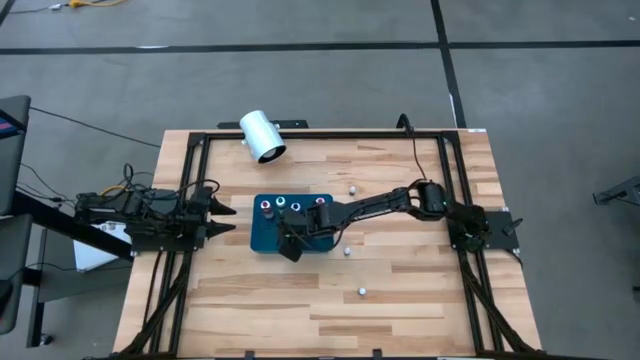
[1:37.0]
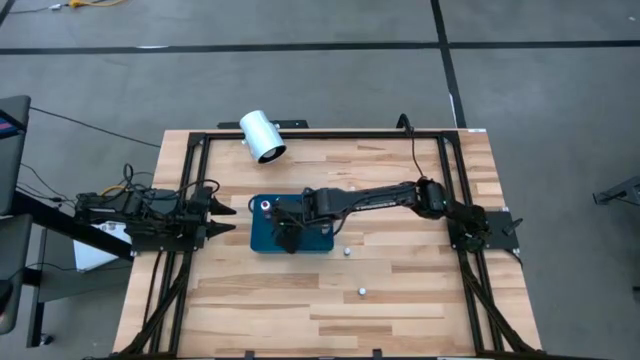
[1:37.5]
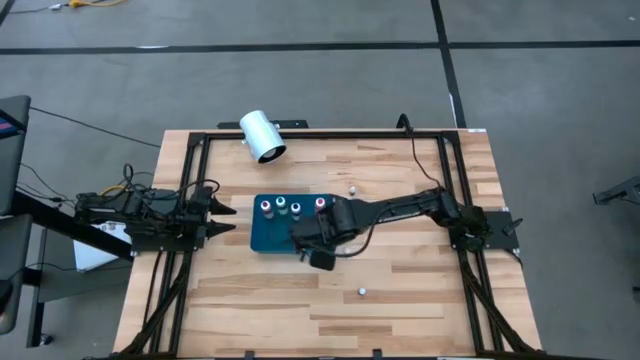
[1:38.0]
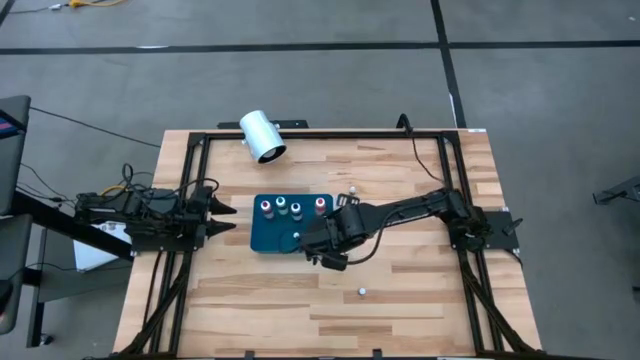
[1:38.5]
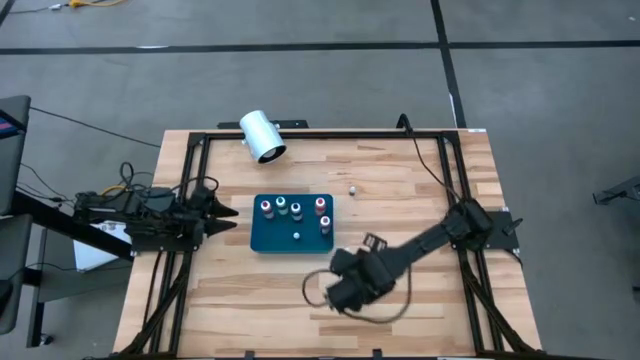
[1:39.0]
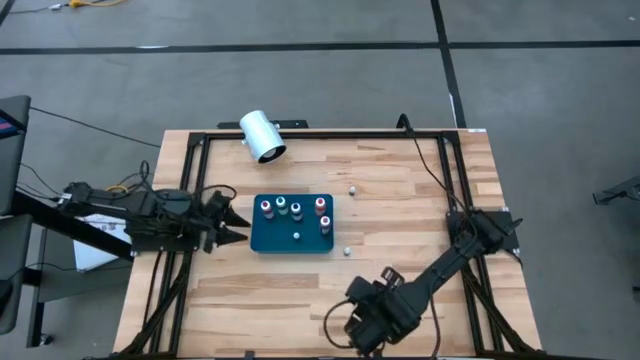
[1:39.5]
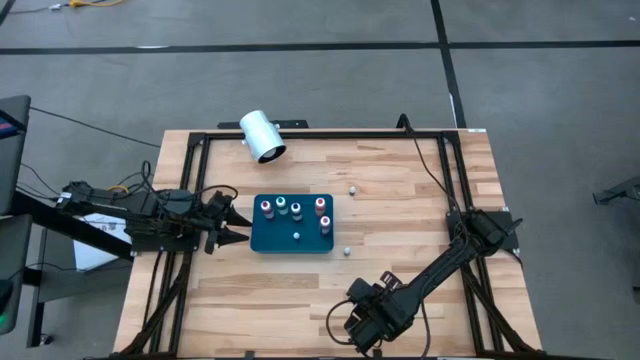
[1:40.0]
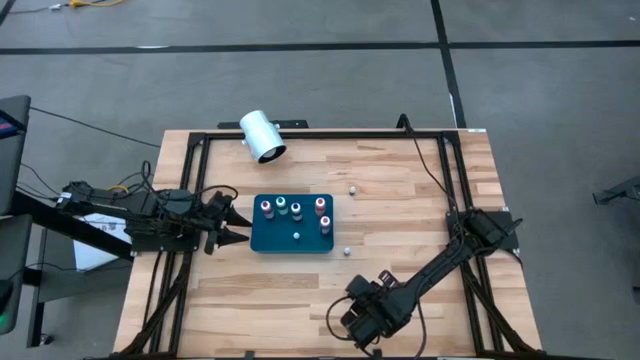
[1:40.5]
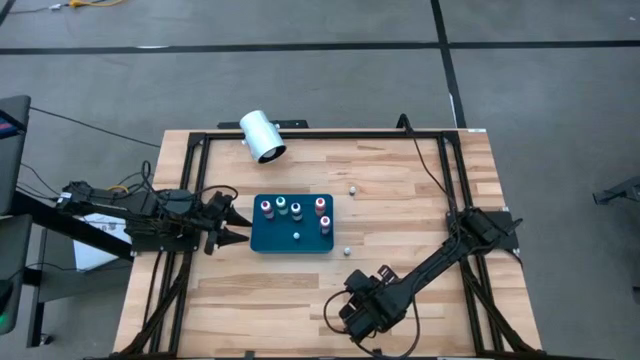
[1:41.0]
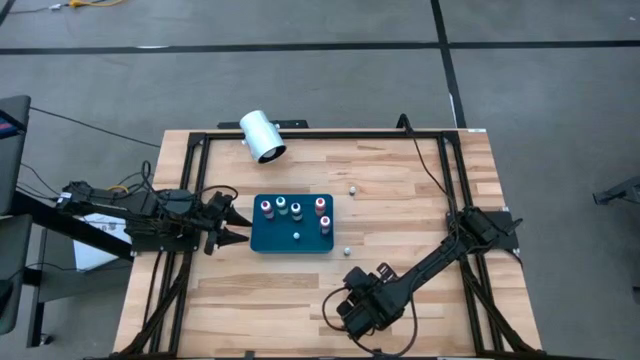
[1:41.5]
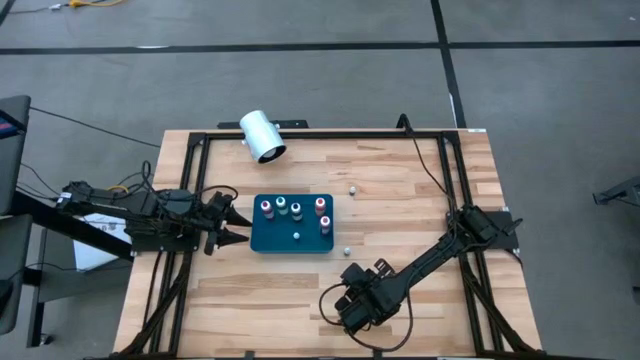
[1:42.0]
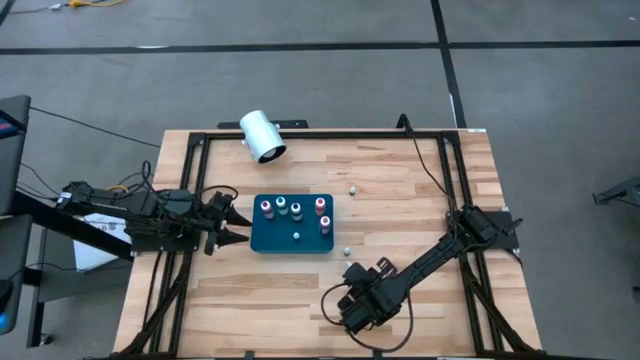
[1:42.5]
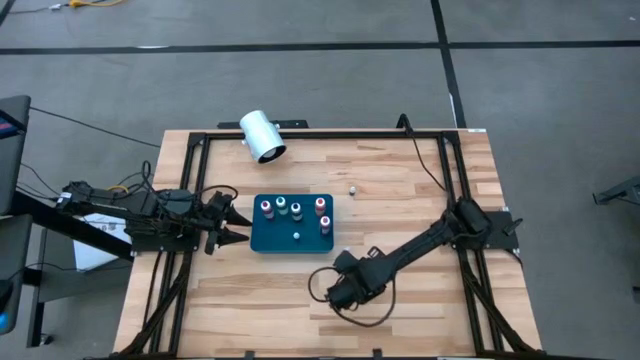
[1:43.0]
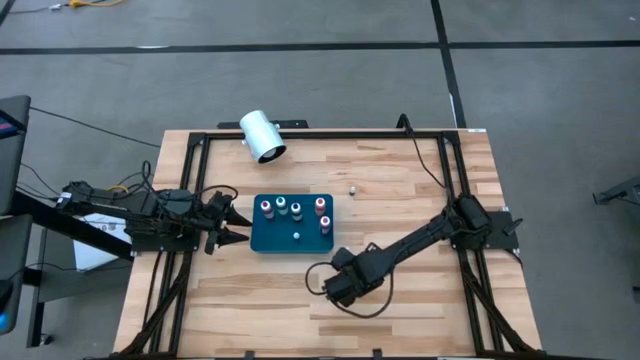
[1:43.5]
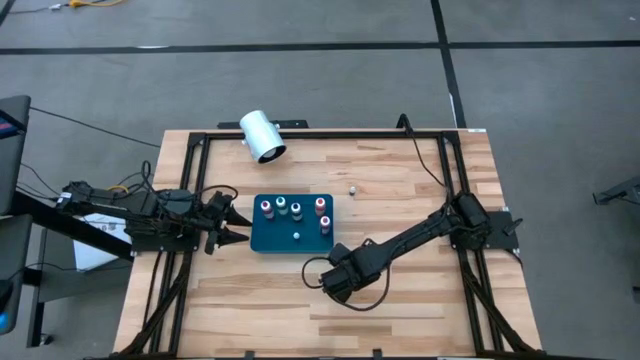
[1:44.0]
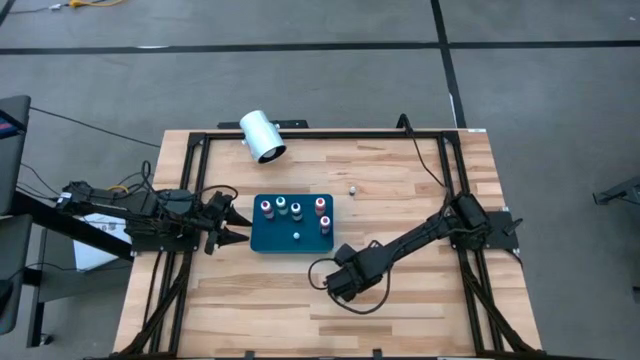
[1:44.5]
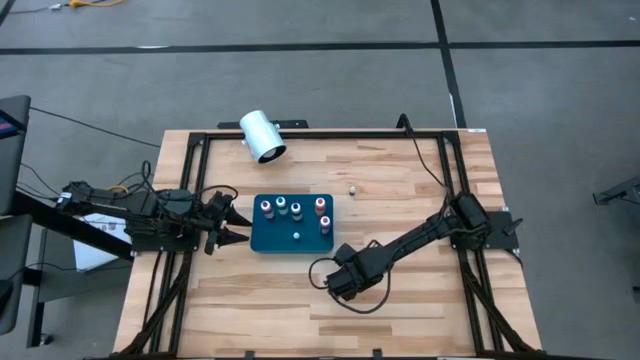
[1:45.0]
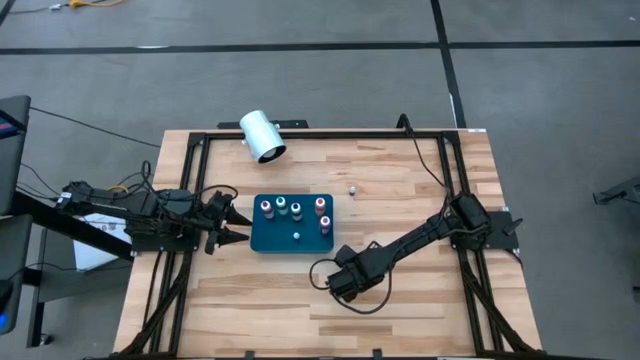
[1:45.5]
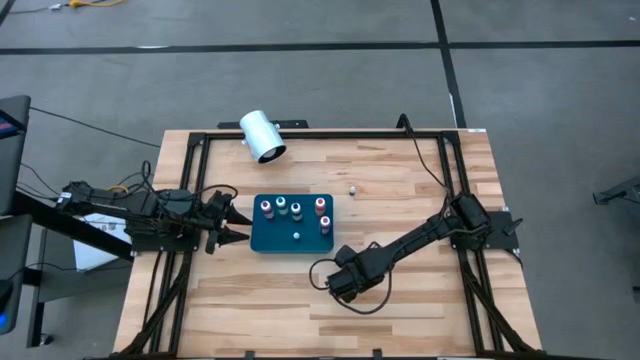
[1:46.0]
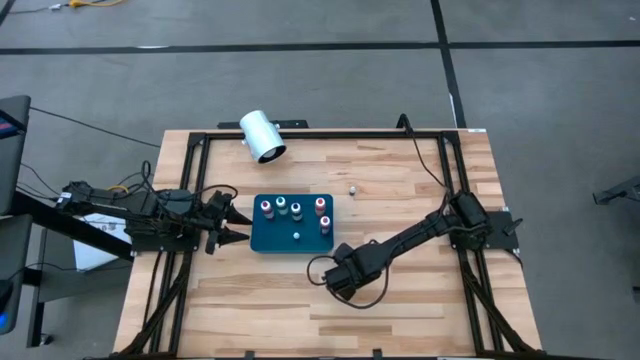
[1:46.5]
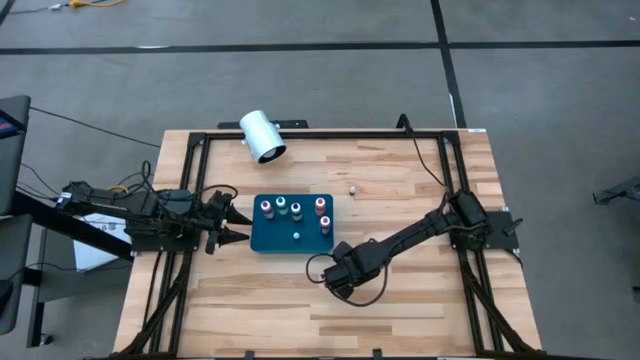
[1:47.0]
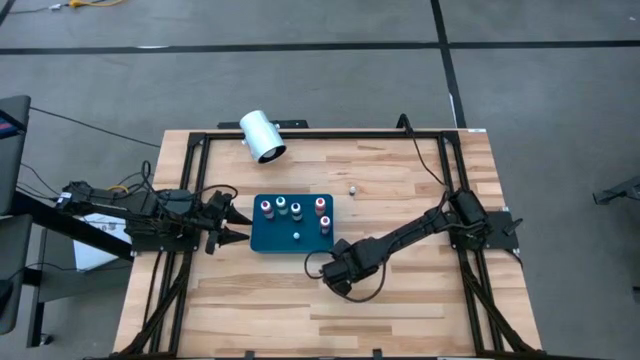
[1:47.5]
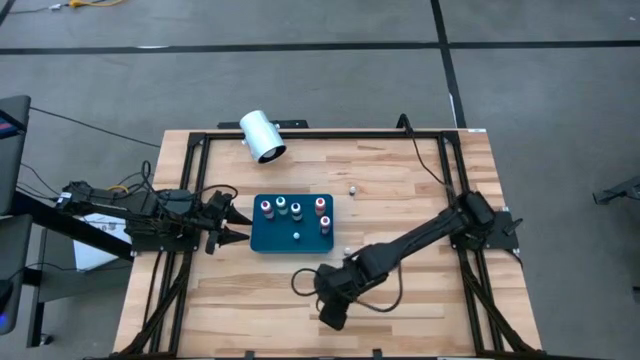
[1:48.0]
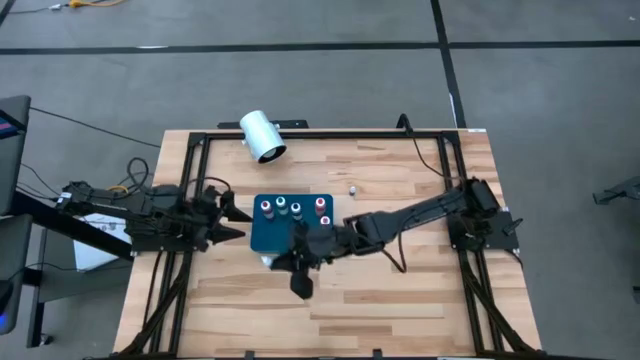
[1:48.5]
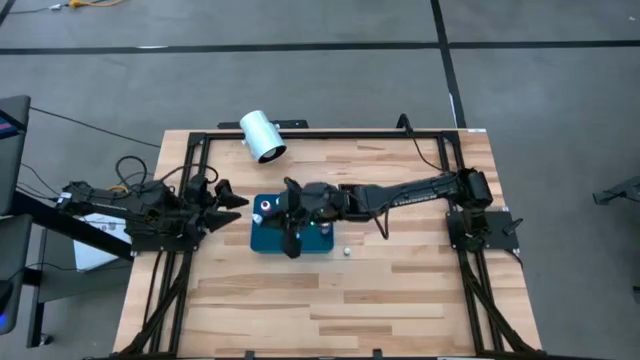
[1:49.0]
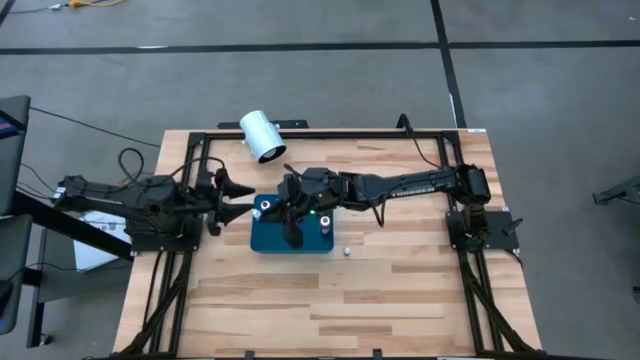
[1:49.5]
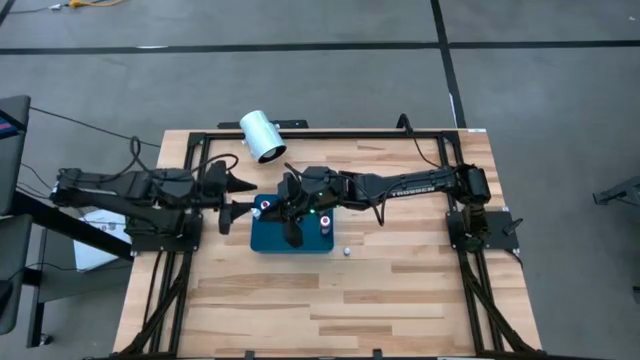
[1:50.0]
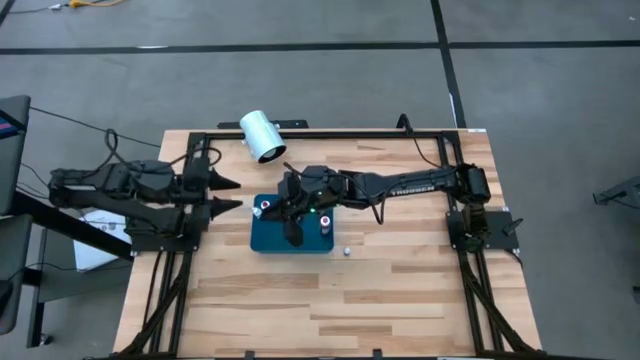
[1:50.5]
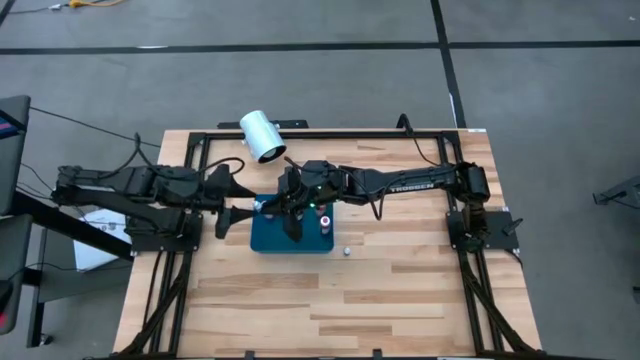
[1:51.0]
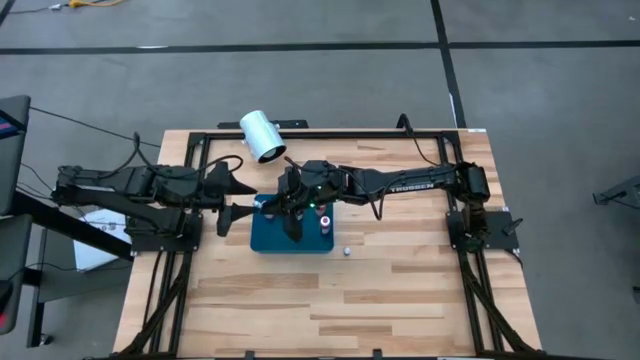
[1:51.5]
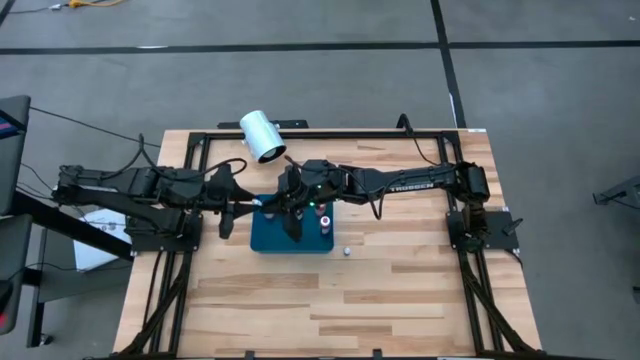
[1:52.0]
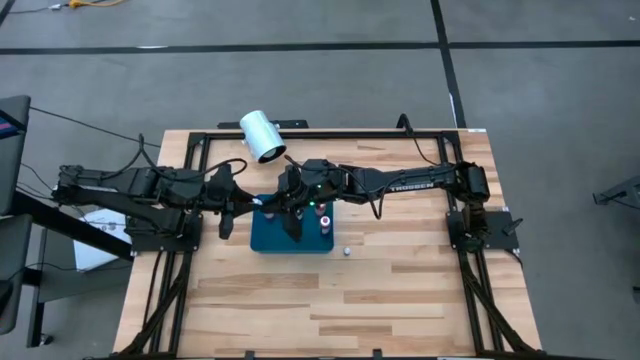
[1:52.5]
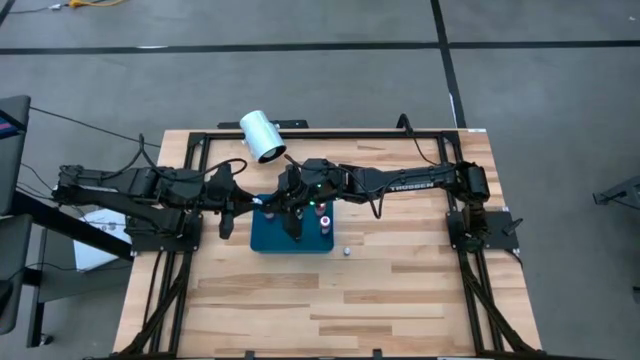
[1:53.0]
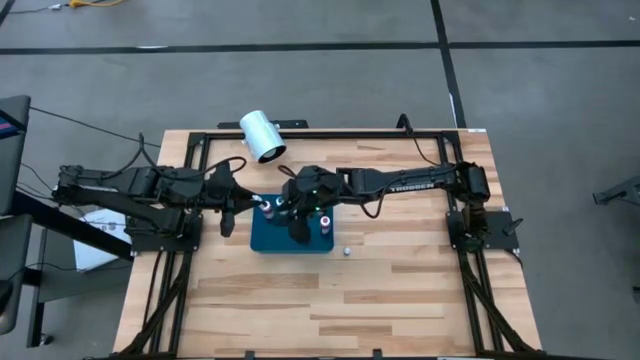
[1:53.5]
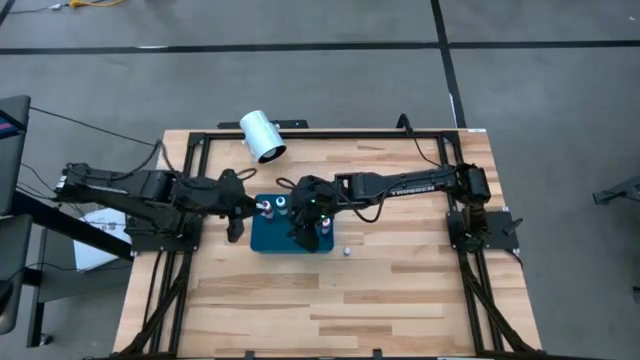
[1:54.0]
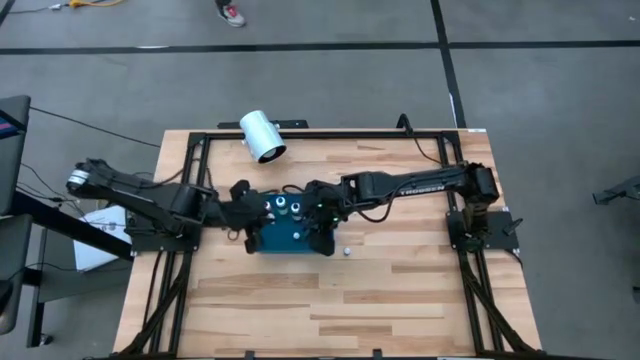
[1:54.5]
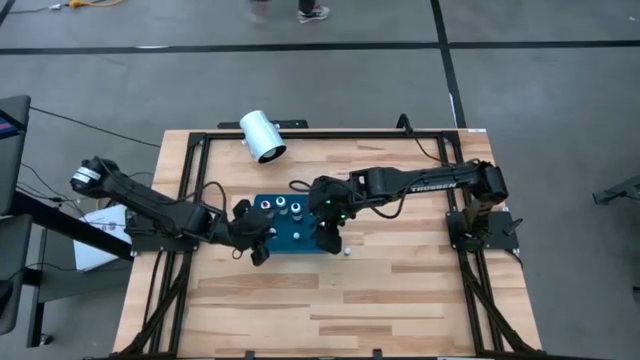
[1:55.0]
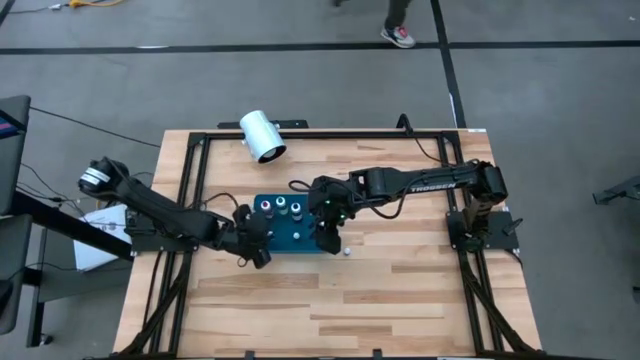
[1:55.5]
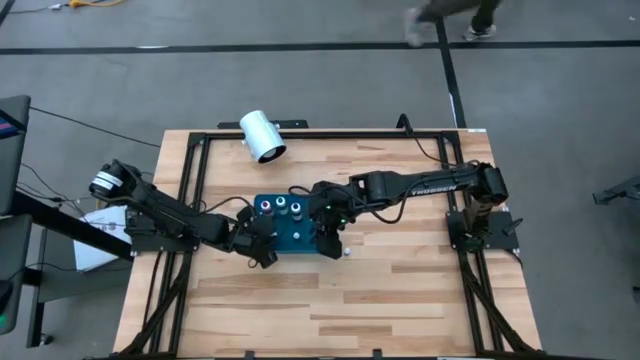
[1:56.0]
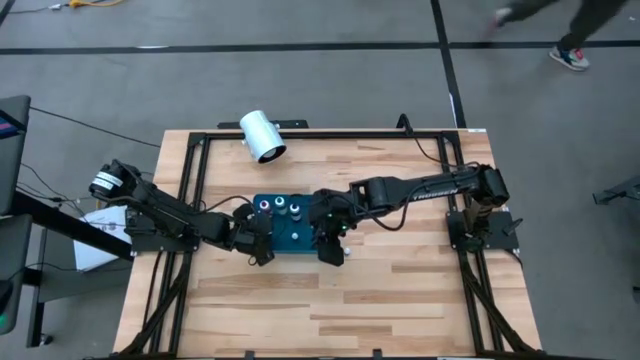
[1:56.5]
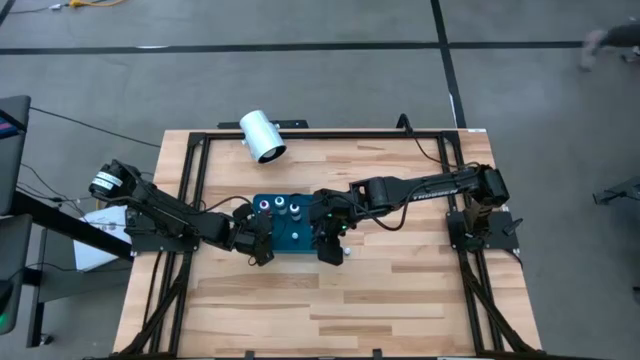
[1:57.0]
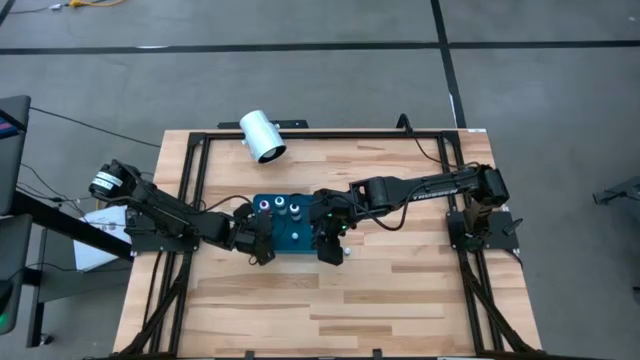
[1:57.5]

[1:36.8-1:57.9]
Task: Pick & Place food coloring
Put the small black food coloring bottle into the bin
